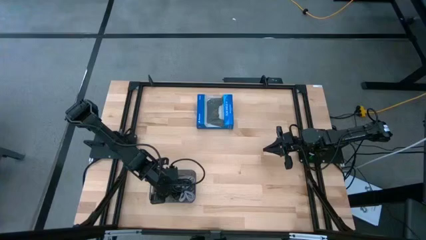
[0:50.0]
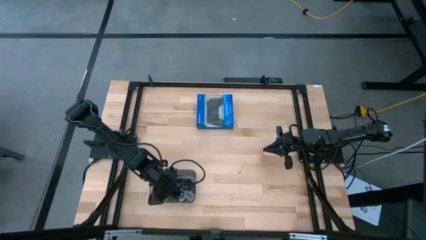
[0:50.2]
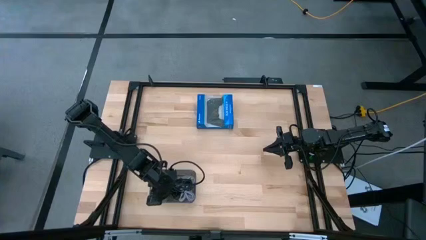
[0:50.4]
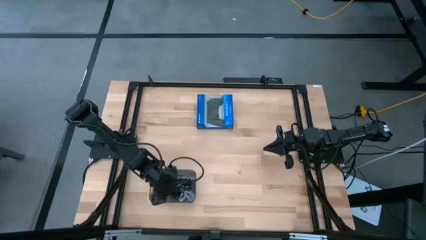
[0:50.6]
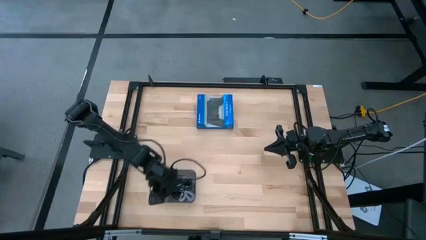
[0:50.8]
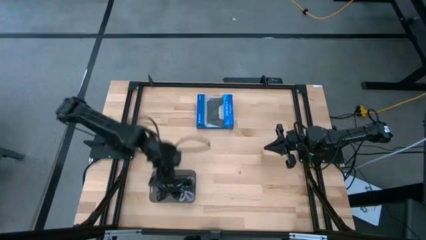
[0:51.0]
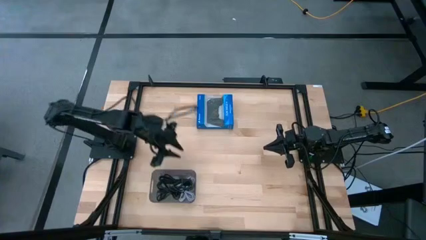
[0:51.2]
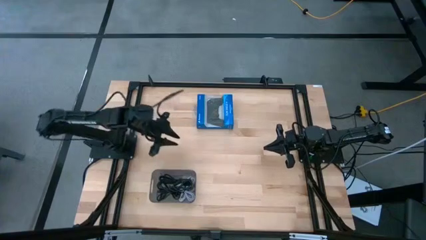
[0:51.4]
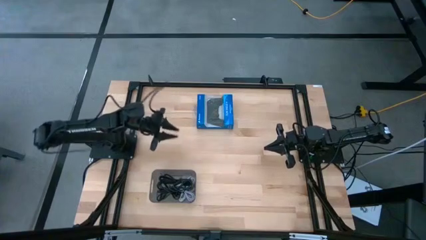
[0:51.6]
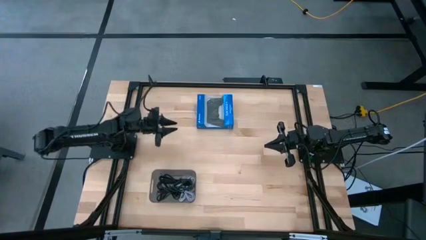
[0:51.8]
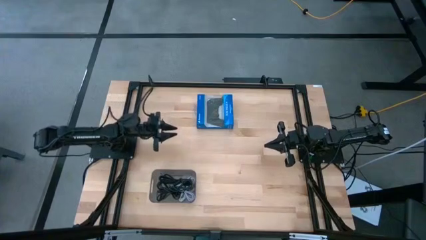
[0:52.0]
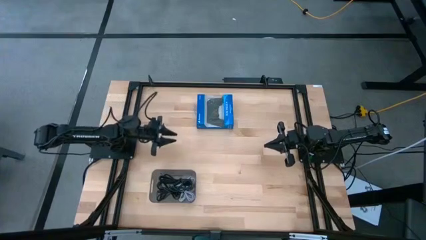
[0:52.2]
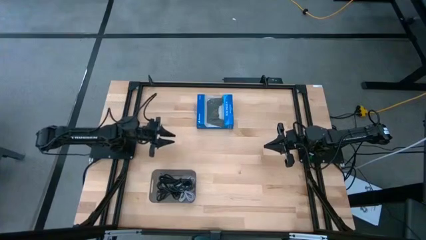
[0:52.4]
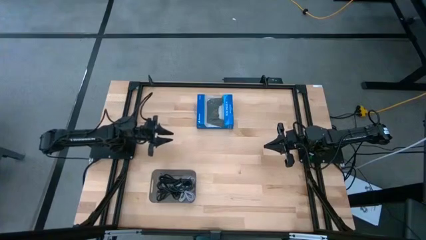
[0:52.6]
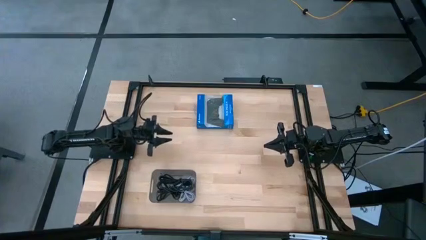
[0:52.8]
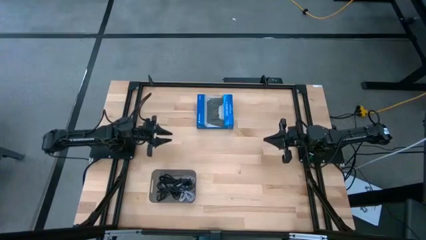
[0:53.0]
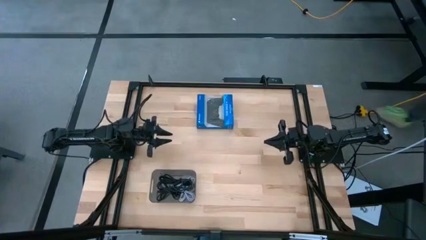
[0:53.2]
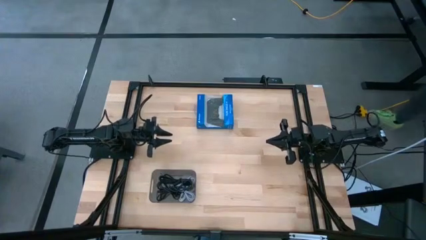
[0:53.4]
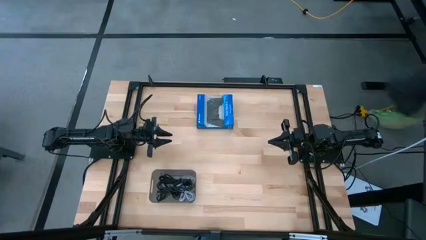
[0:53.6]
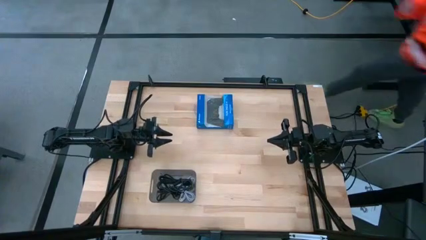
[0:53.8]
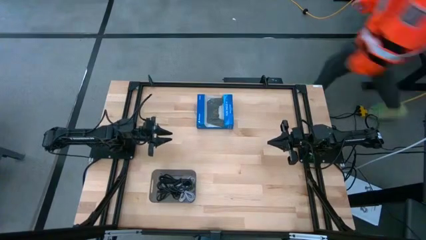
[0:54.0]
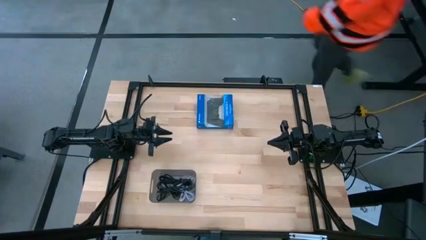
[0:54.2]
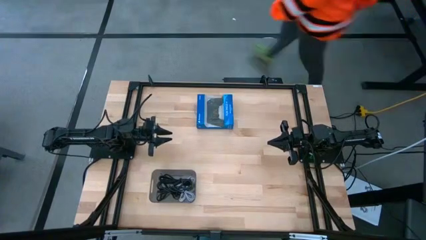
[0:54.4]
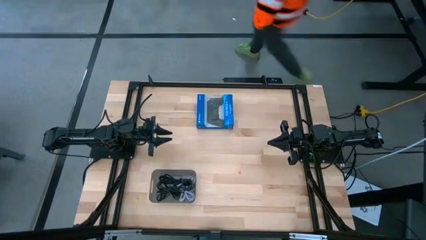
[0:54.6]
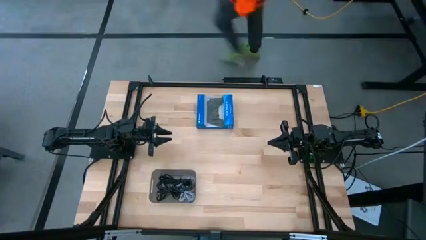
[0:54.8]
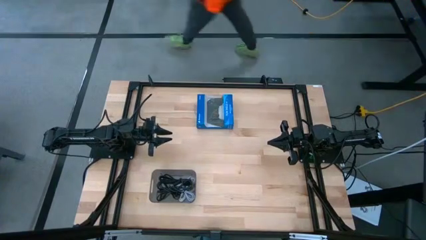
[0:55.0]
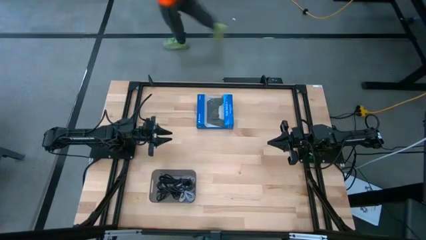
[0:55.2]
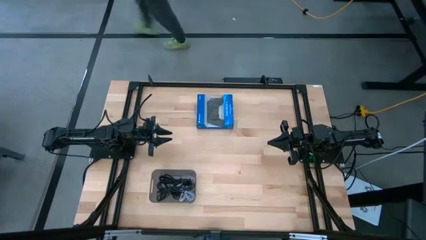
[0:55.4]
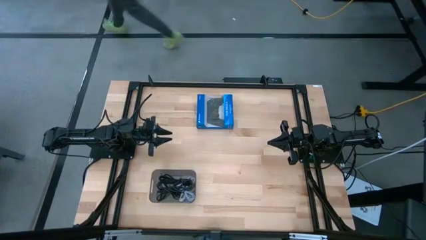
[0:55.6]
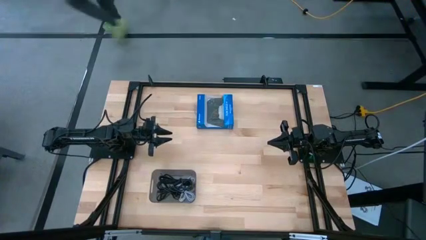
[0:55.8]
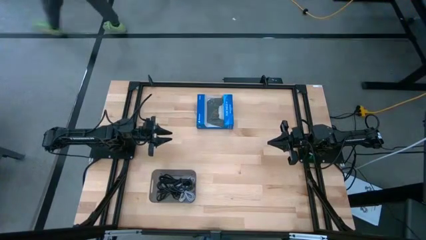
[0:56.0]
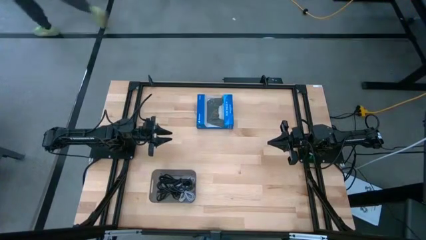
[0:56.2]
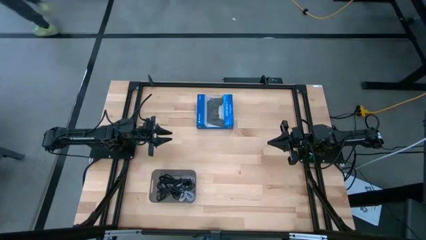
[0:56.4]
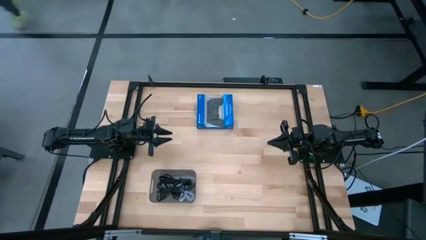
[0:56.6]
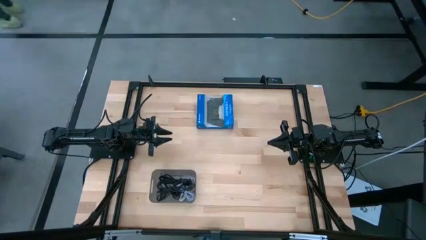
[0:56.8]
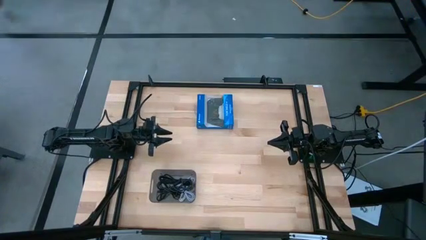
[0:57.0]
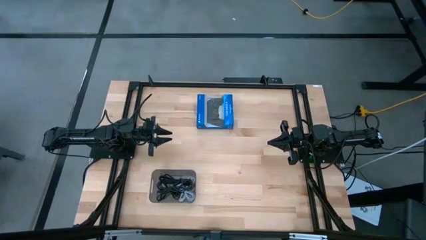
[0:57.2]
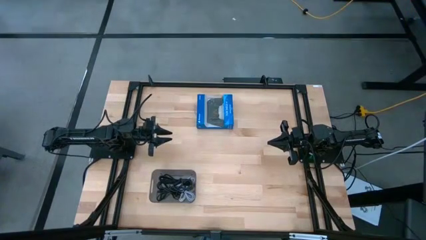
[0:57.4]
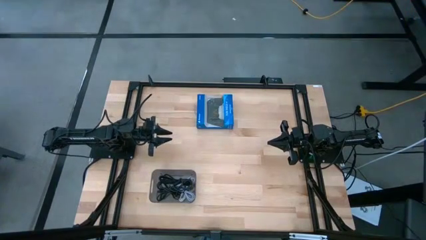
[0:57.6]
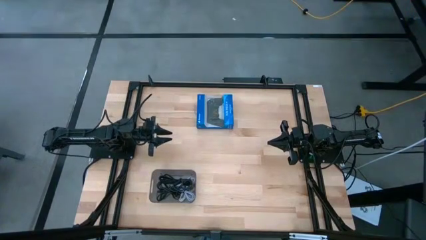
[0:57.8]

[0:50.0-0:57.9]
Task: Pick and place USB-C Cables
Return to Home Position

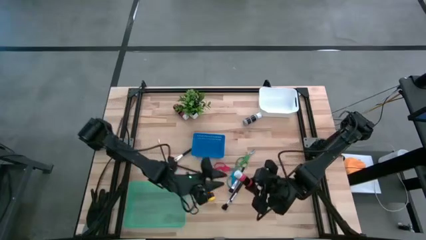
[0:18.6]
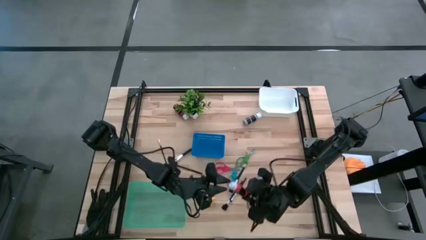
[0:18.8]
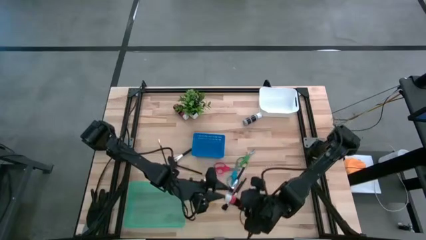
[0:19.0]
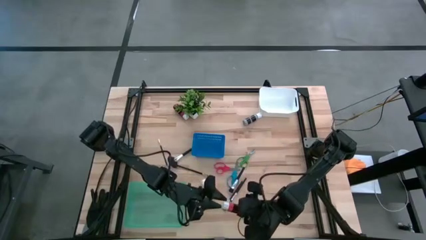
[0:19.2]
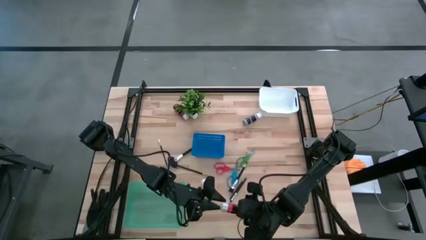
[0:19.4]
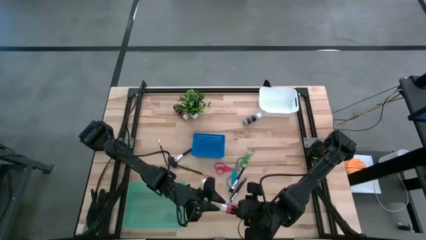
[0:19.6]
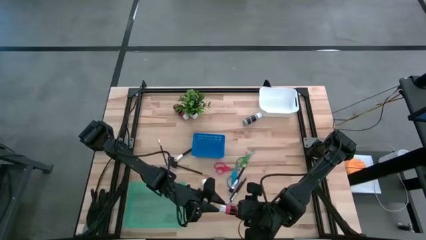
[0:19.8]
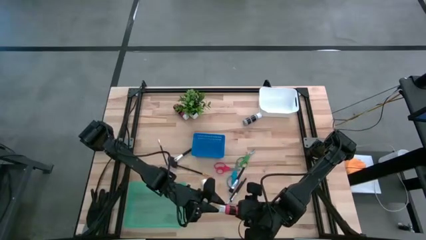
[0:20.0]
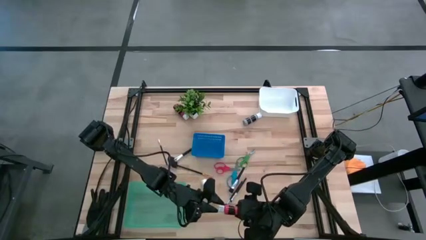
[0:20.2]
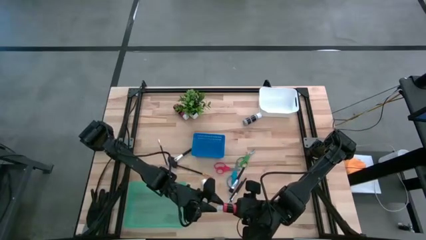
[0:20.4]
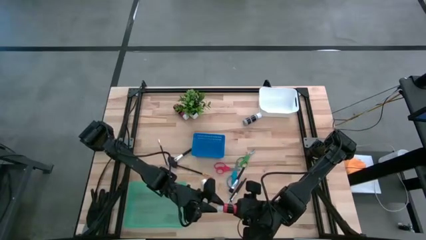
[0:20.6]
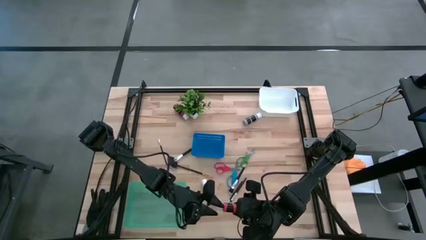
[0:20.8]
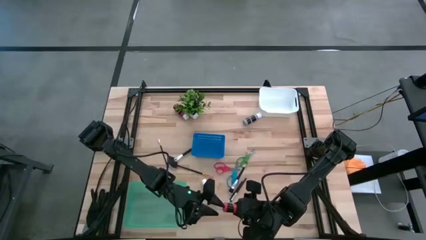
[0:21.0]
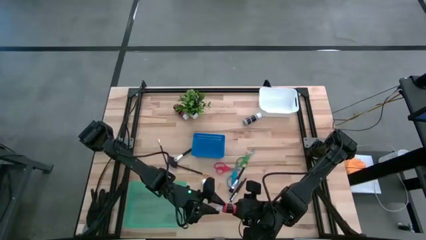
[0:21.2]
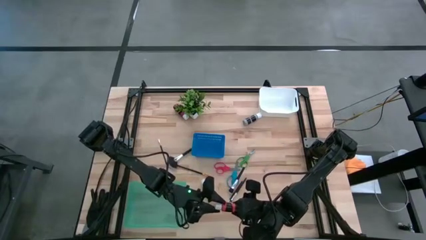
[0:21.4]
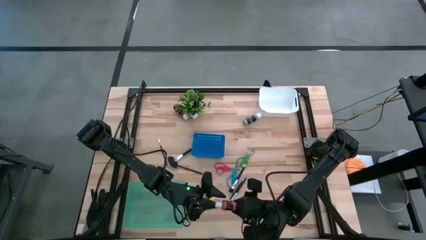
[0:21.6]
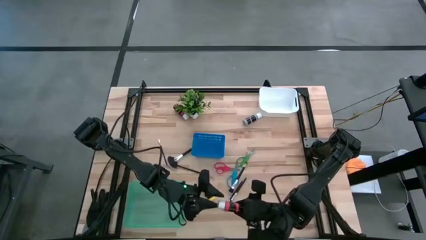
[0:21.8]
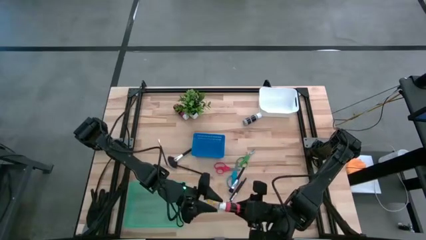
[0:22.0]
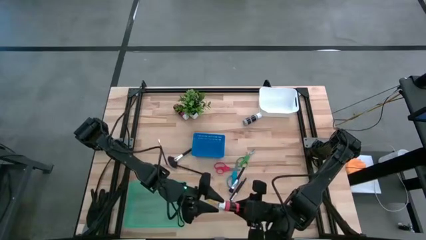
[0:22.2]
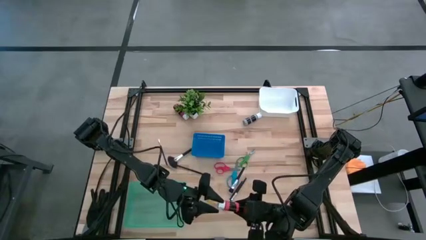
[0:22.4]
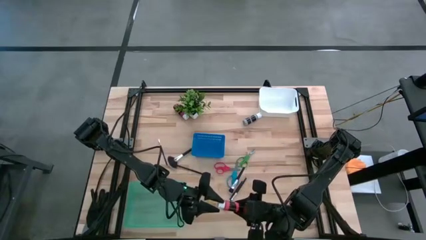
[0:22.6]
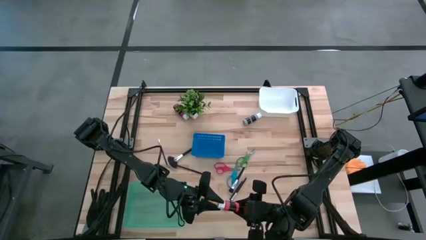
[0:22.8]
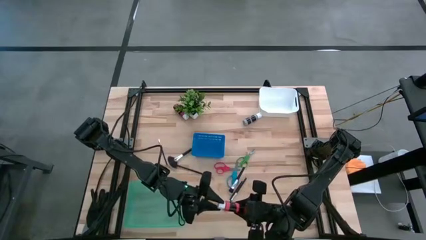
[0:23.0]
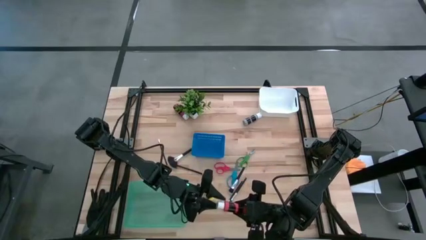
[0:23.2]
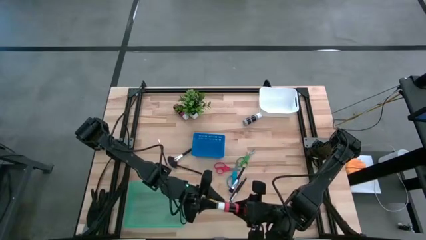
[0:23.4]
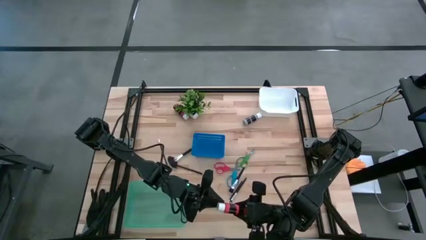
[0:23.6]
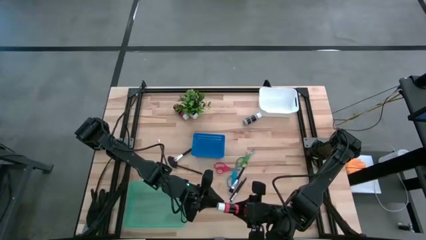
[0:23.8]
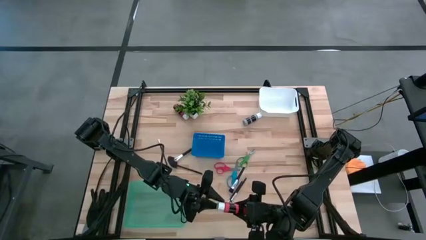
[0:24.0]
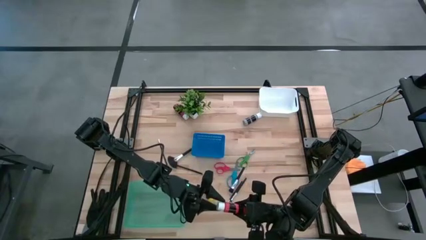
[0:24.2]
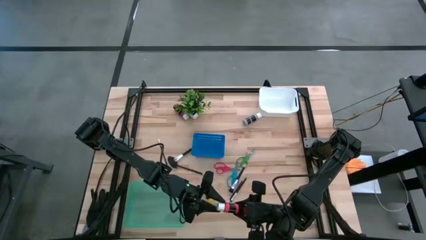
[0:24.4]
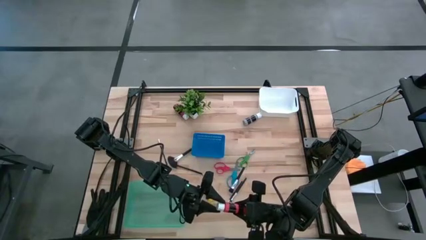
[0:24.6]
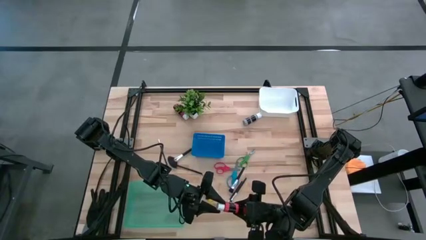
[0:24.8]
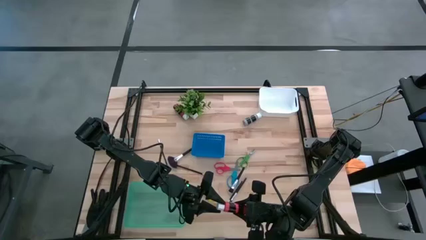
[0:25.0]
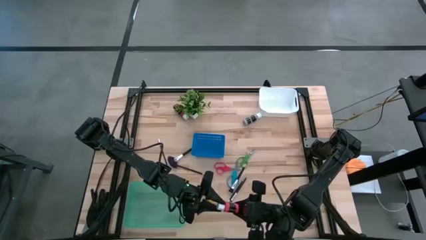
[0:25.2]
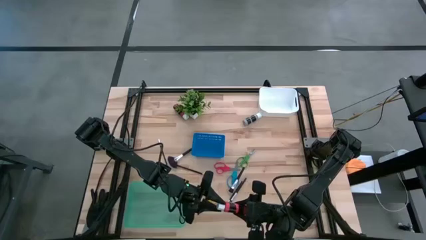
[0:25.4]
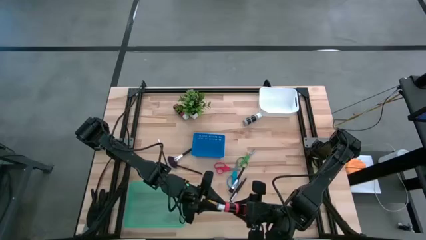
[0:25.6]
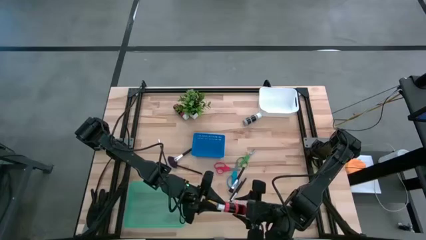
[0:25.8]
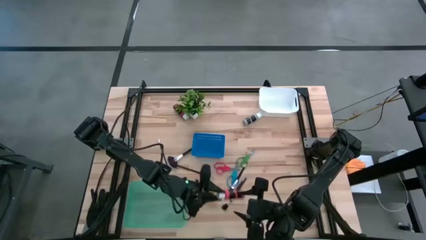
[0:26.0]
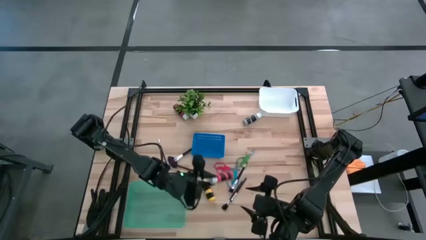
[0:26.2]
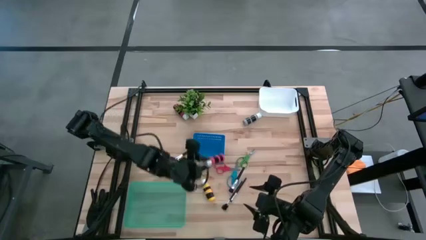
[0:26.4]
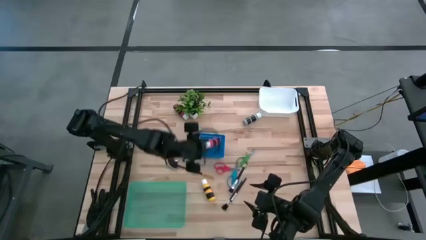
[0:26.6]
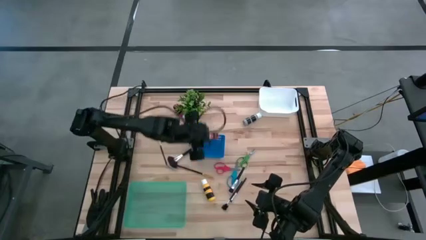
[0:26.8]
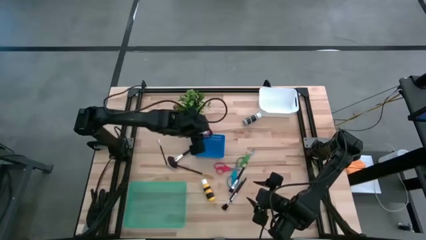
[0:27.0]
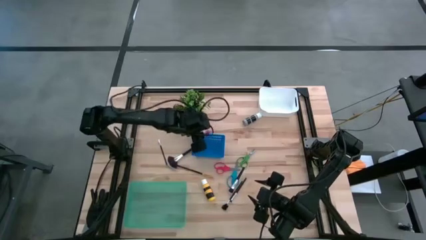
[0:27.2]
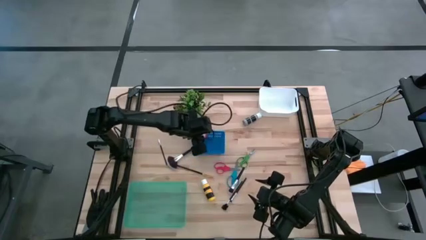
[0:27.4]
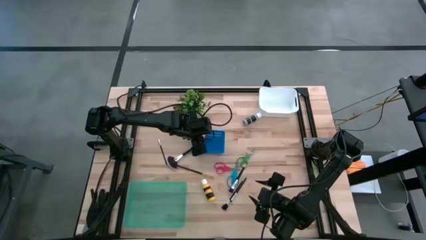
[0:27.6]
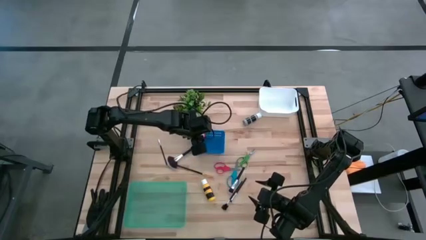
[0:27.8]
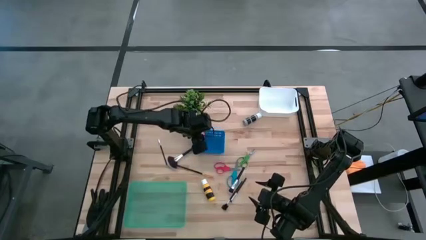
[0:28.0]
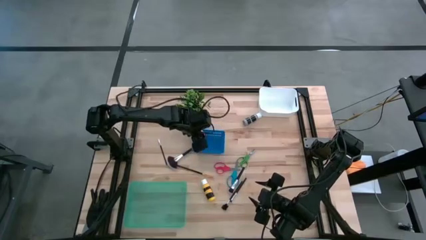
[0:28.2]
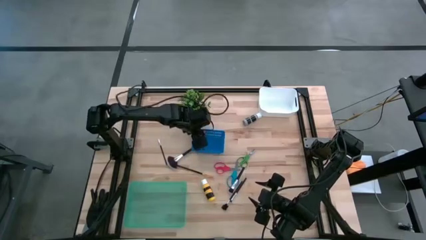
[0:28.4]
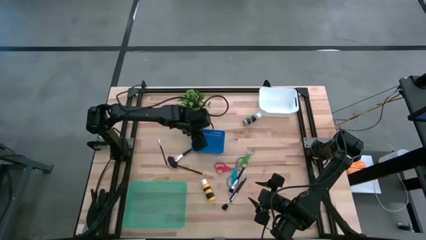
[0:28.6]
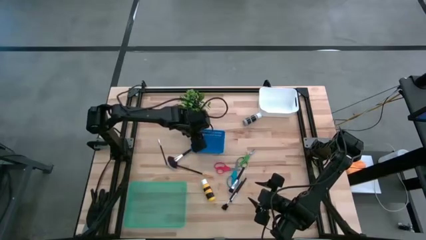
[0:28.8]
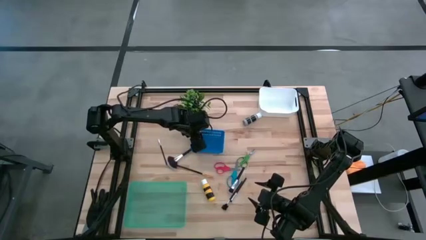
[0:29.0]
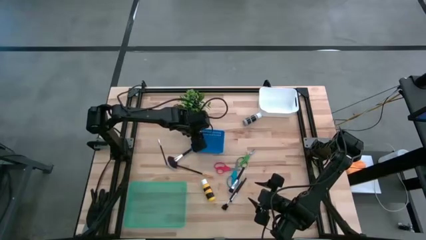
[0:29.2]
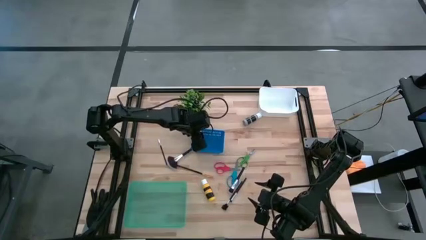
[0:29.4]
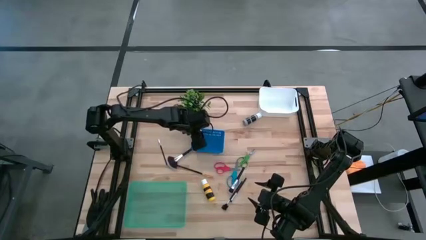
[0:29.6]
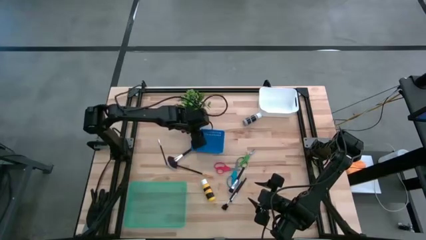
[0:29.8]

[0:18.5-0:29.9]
Task: Pick & Place Paint Supplies
Put the orange paint into the blue bin
